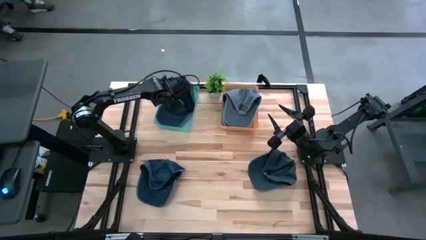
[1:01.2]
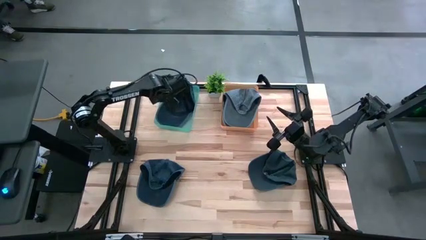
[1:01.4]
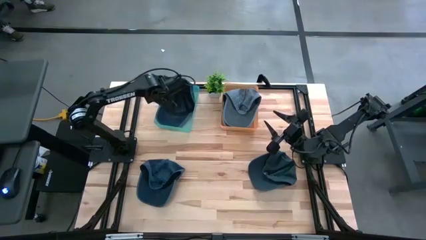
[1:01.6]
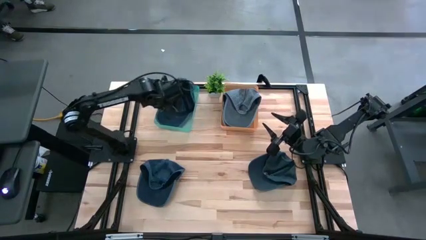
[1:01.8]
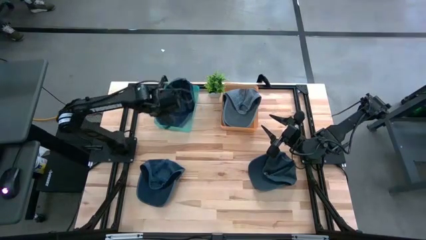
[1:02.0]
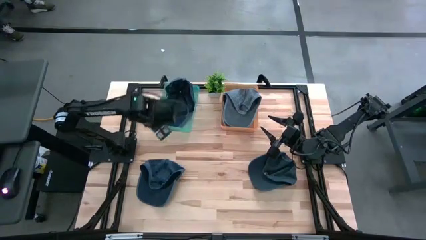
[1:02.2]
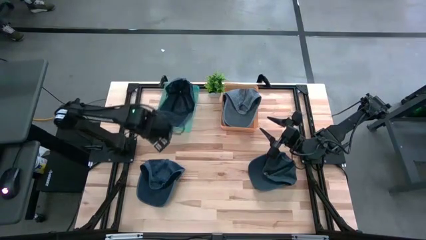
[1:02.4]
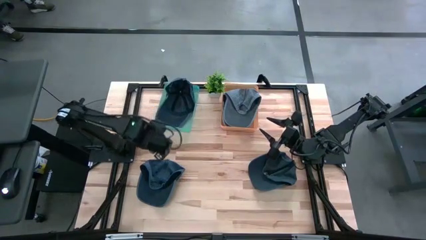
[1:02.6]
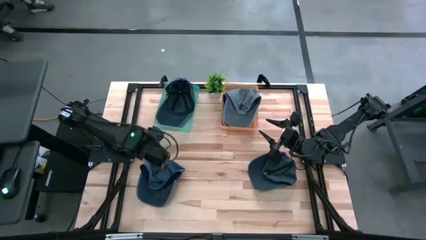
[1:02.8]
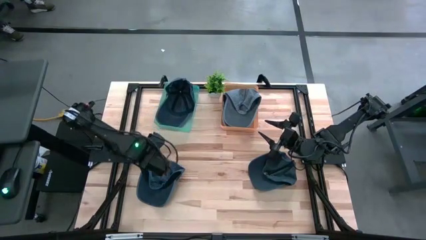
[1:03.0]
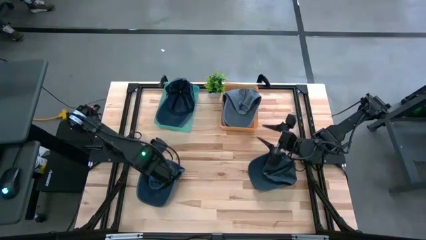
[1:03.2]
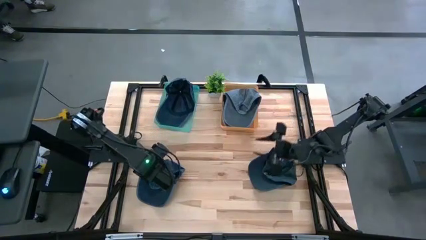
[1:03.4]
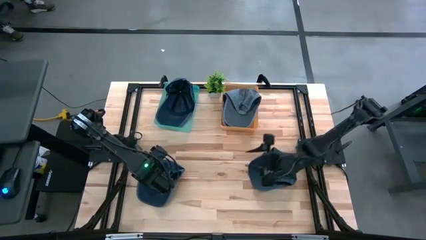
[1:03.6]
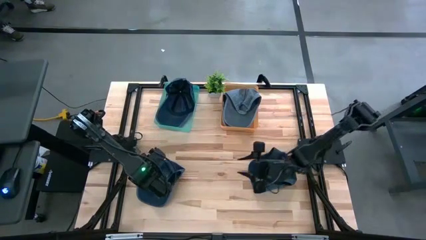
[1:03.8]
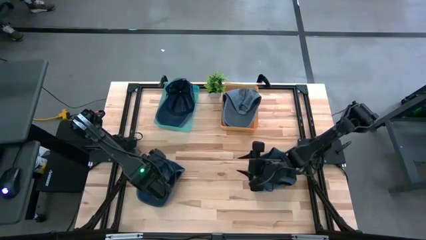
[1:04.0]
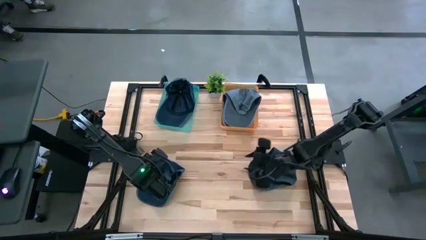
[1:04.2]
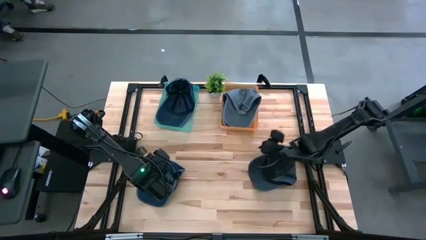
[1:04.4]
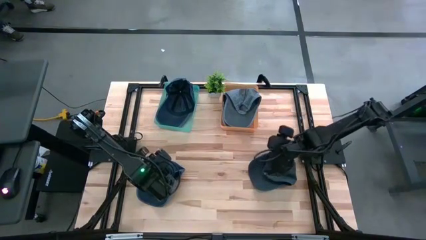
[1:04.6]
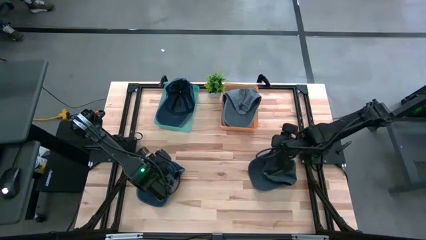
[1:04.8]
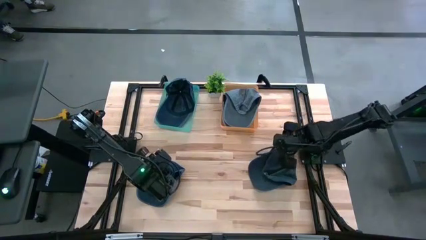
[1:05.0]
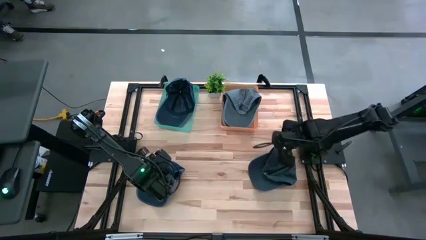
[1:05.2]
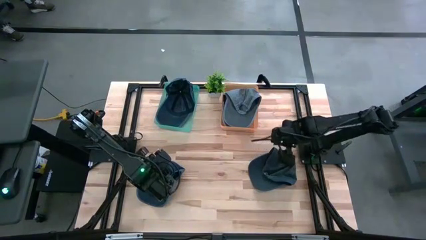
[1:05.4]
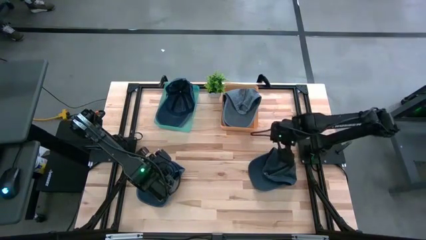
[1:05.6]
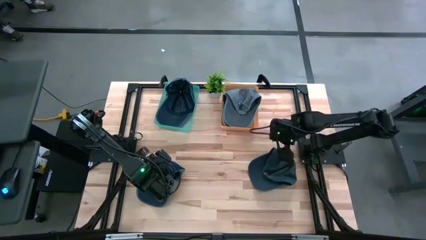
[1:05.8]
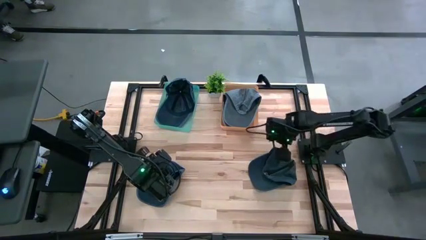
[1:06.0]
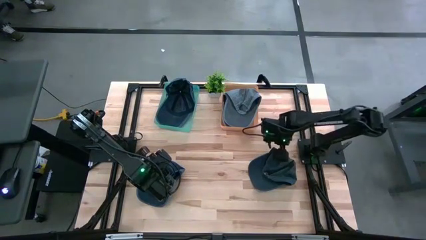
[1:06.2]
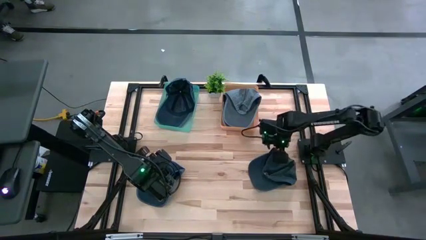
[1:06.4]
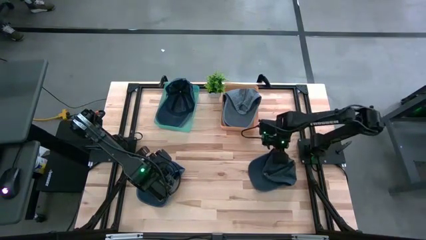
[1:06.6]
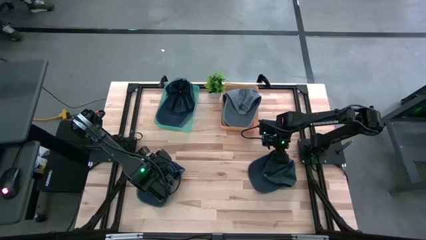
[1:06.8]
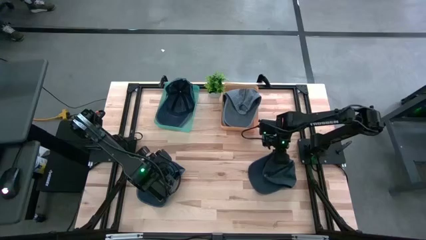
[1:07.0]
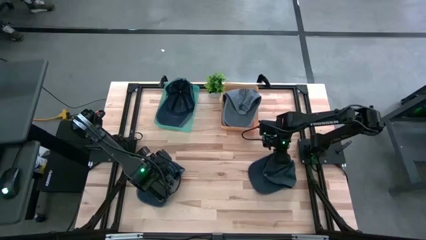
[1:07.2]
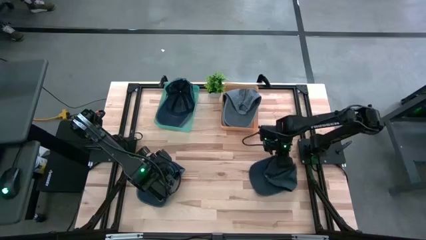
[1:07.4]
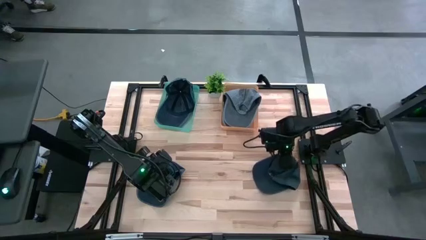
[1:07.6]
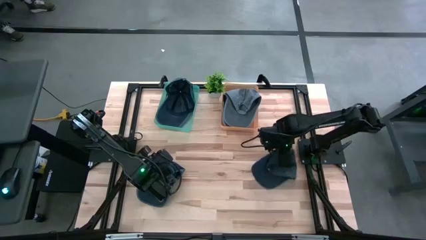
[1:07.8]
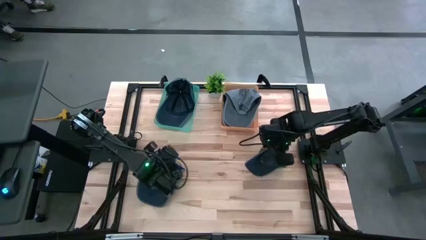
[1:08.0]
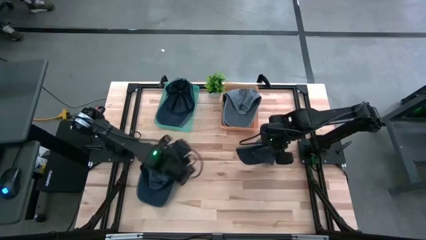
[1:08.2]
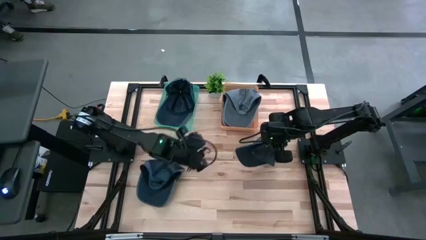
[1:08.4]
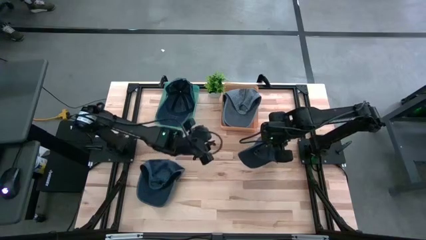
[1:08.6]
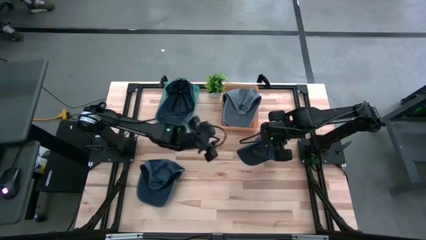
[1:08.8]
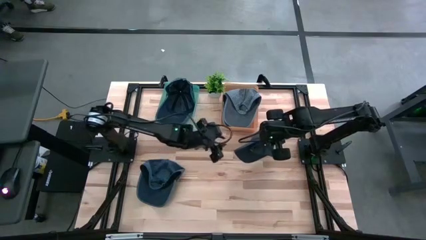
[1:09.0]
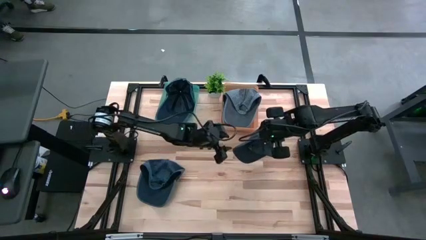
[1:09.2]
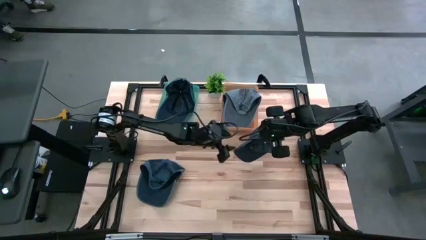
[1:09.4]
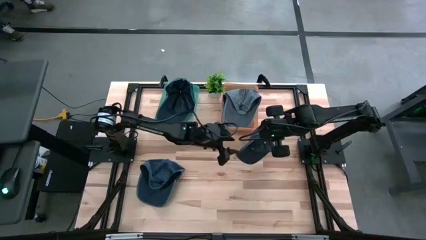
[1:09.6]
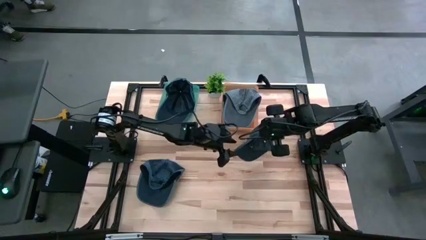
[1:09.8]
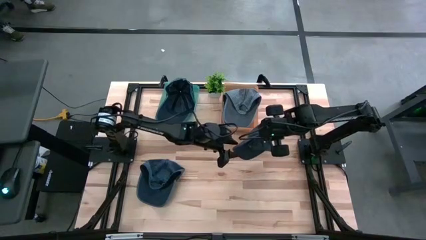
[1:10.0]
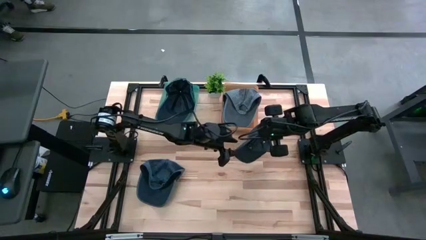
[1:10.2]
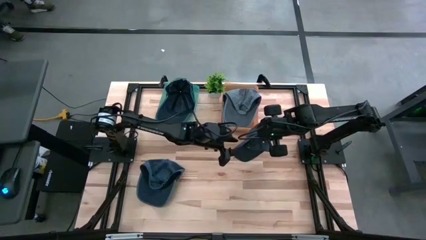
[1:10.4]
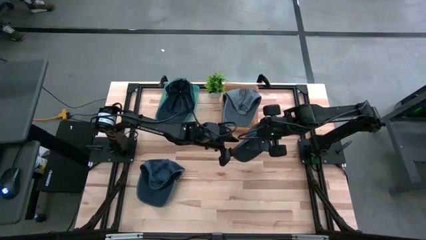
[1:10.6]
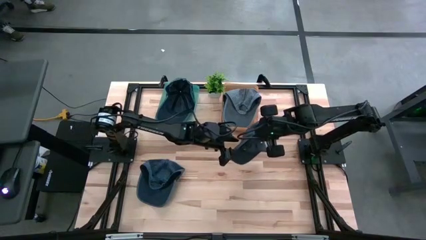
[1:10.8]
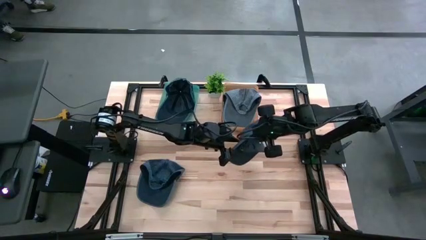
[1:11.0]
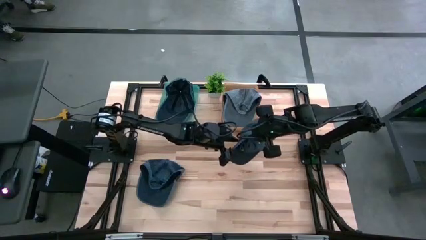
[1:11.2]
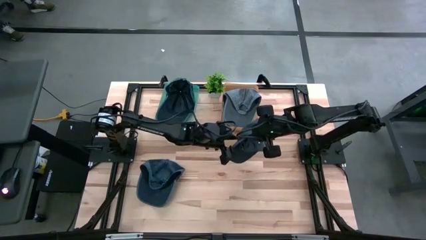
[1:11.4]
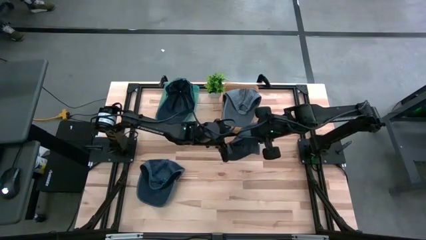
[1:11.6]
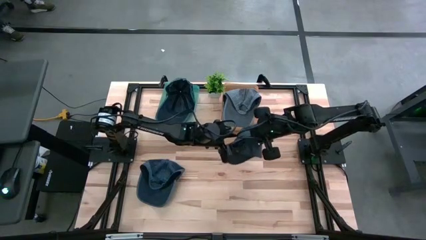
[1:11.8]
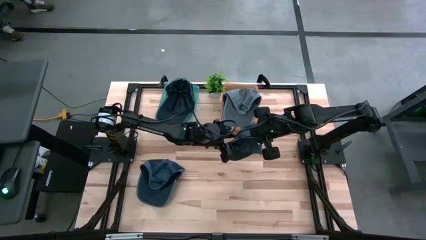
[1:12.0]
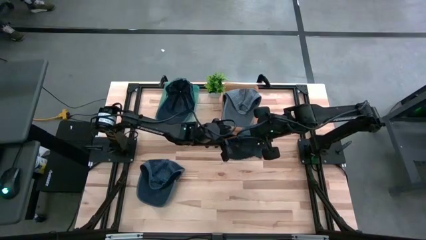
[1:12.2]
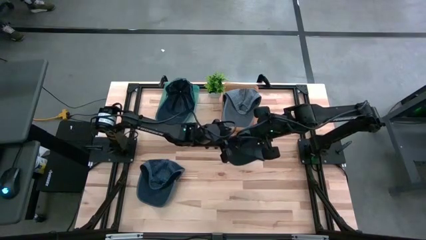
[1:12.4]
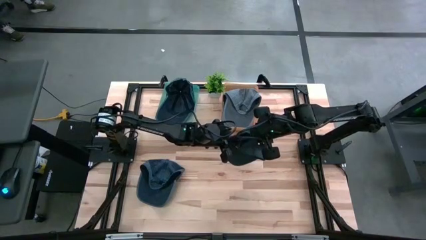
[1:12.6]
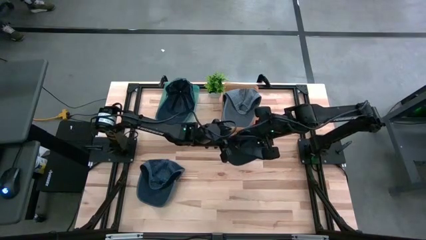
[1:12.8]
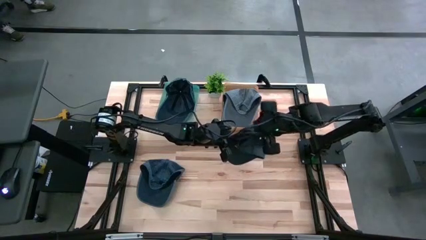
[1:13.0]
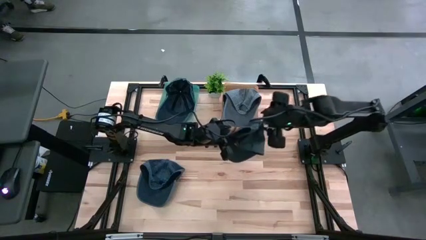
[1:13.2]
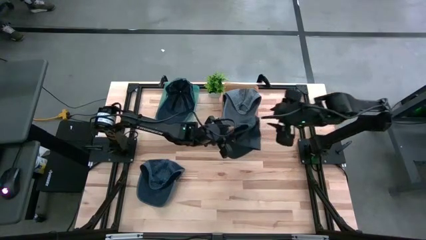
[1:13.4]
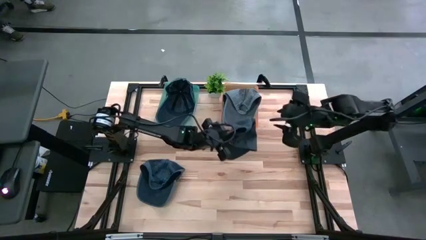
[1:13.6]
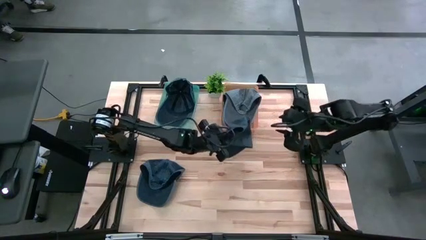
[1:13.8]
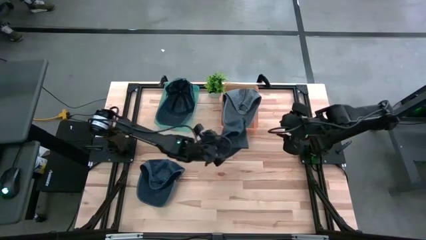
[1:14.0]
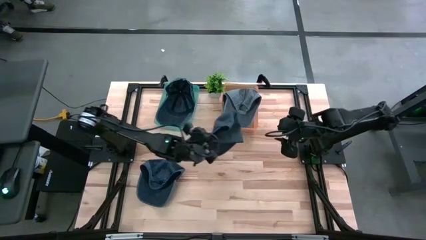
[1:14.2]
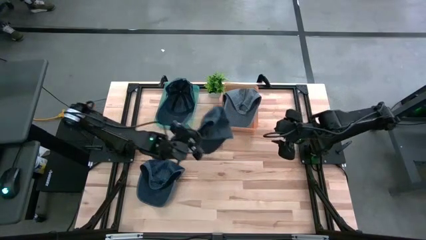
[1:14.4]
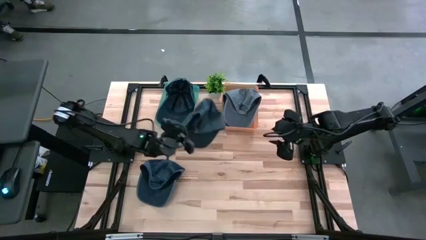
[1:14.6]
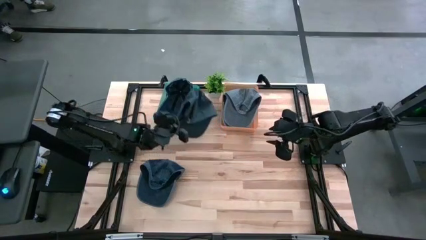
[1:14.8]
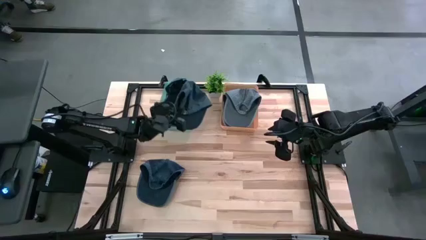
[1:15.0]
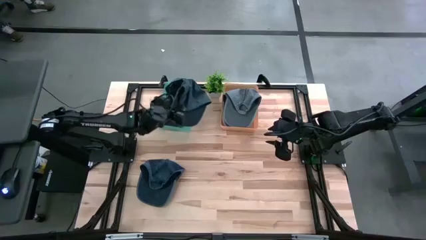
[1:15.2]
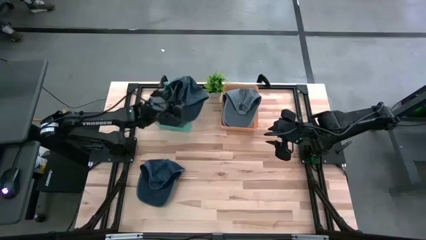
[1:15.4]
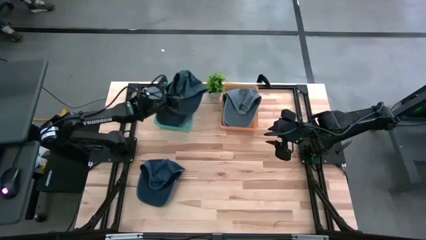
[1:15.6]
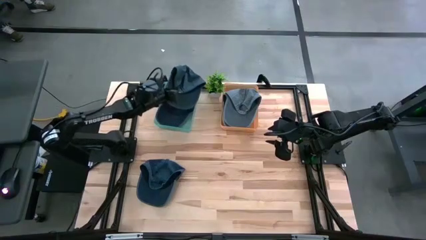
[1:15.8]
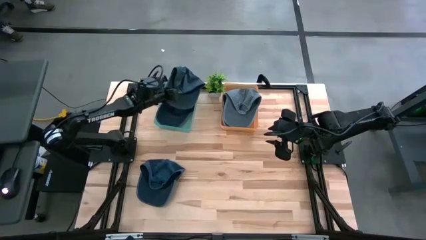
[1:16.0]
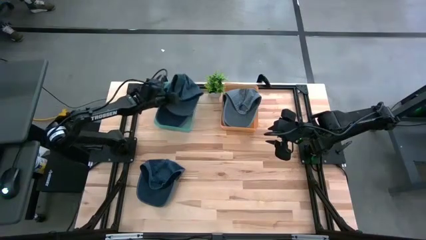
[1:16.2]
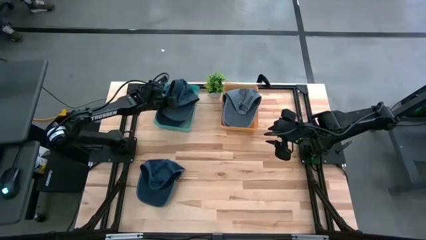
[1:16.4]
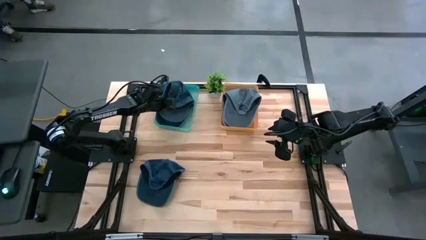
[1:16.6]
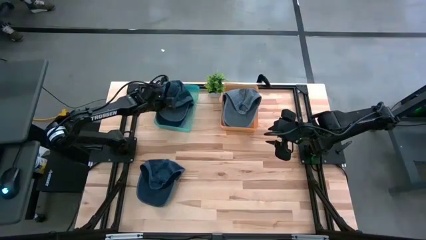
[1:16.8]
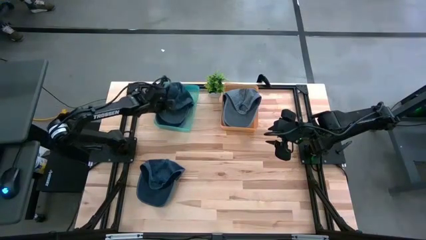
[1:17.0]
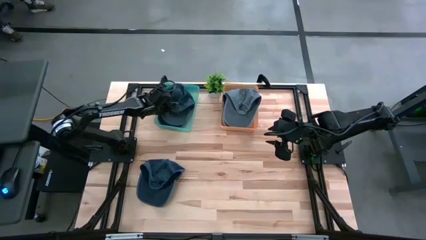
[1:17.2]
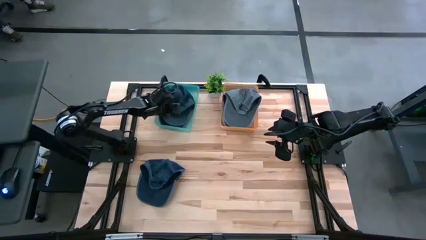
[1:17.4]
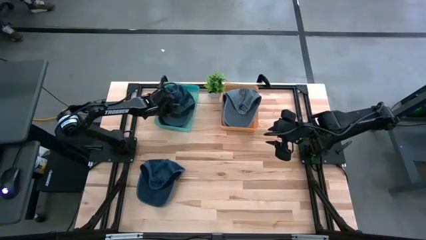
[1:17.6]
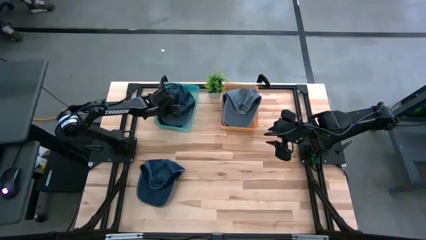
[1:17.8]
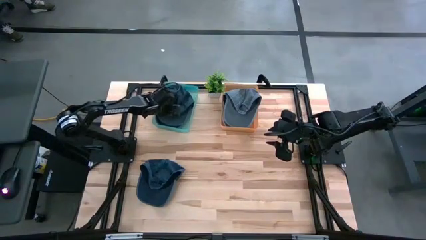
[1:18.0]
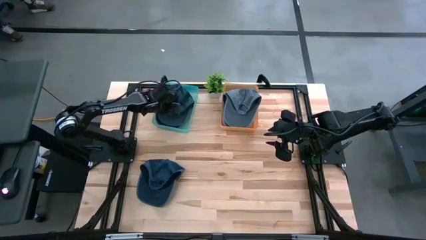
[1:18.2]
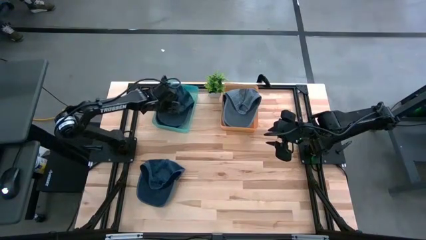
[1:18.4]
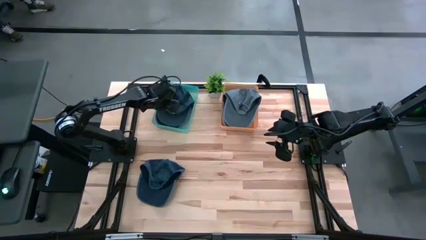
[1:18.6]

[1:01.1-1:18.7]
Task: Pick & Place hat
Put the right dark gray cap into the green bin
